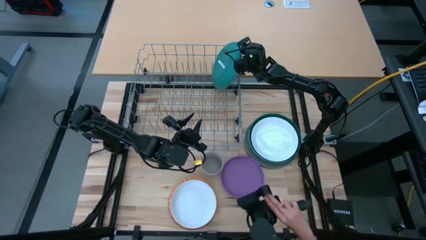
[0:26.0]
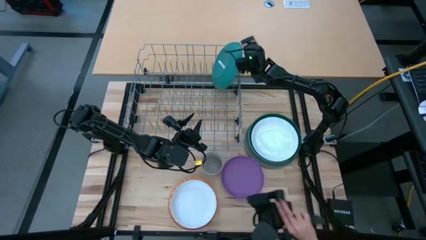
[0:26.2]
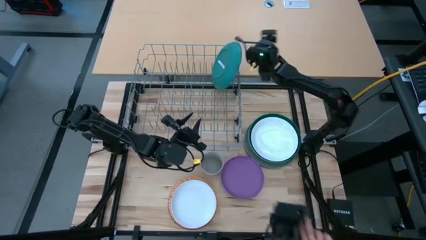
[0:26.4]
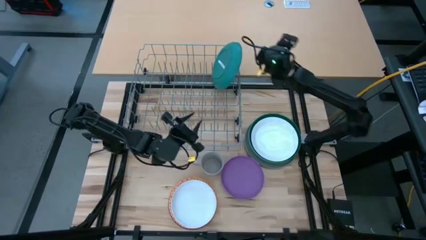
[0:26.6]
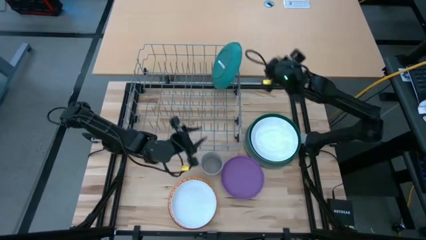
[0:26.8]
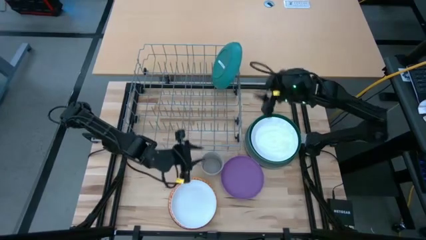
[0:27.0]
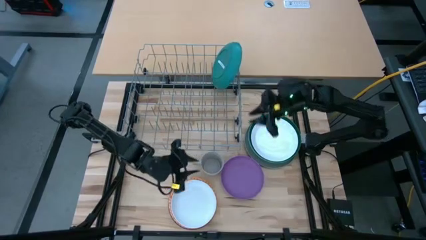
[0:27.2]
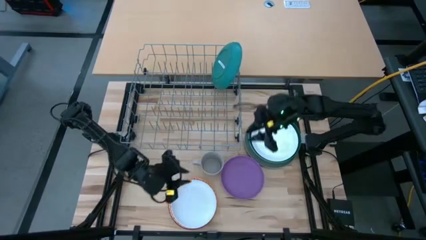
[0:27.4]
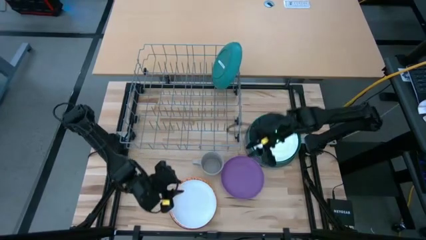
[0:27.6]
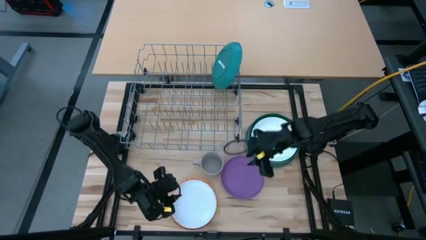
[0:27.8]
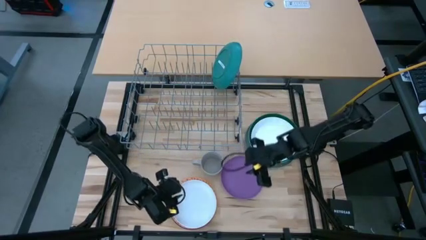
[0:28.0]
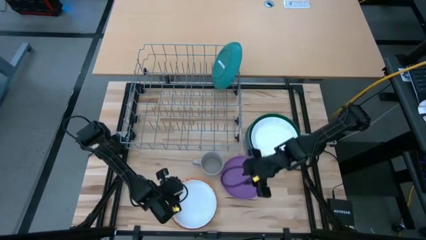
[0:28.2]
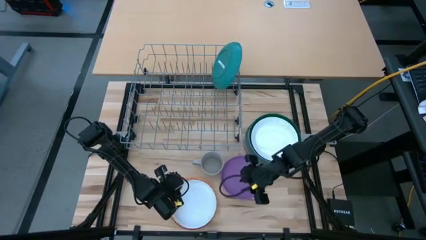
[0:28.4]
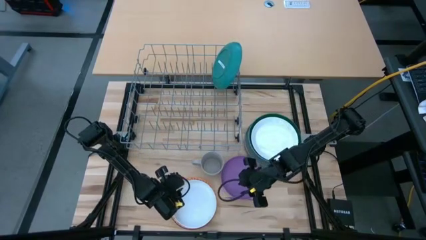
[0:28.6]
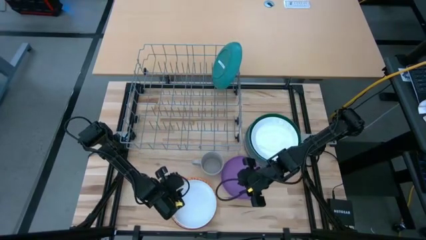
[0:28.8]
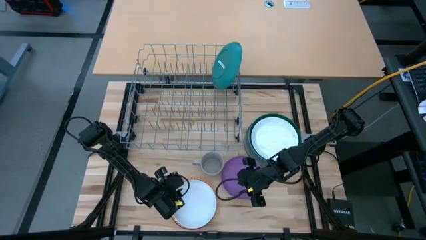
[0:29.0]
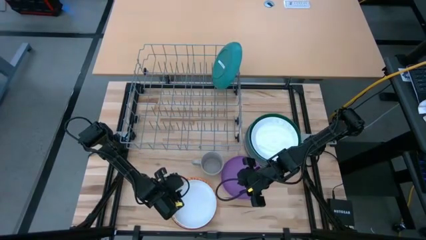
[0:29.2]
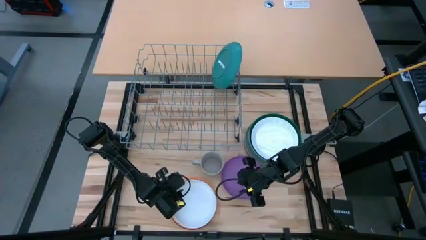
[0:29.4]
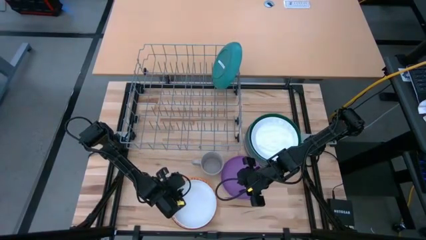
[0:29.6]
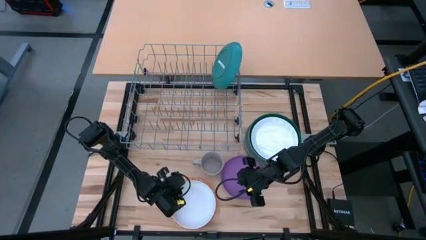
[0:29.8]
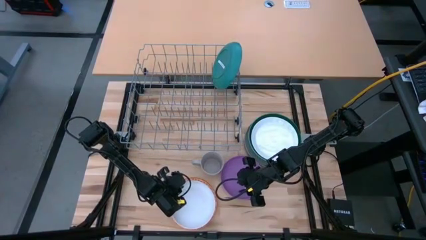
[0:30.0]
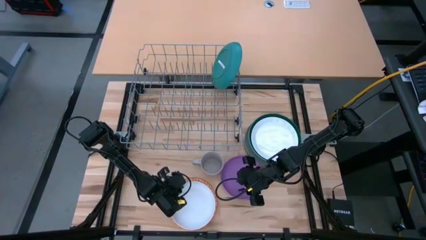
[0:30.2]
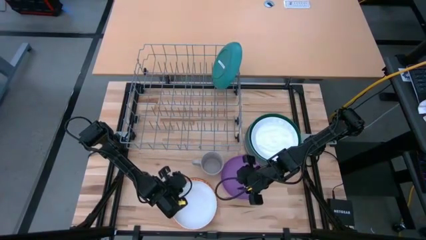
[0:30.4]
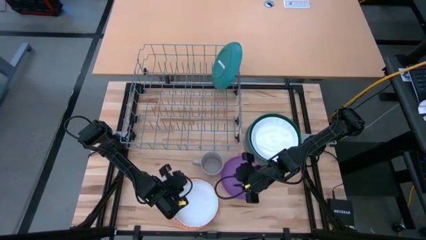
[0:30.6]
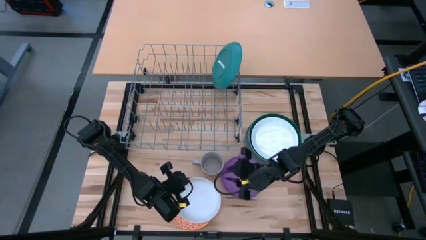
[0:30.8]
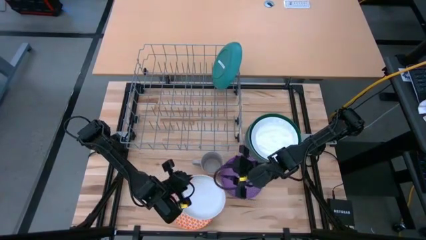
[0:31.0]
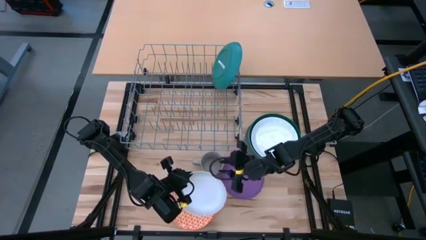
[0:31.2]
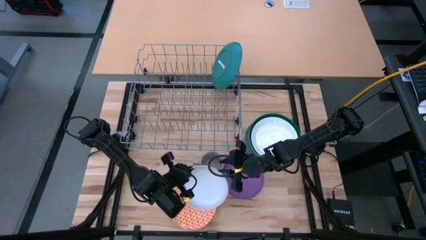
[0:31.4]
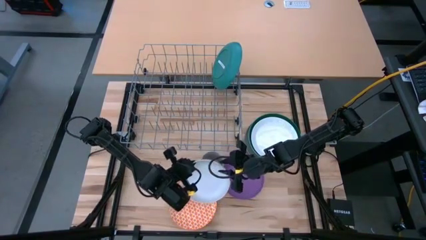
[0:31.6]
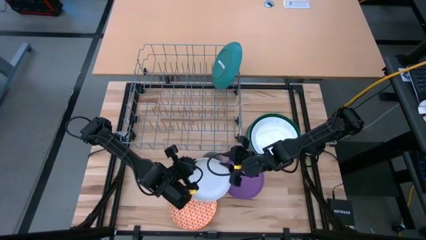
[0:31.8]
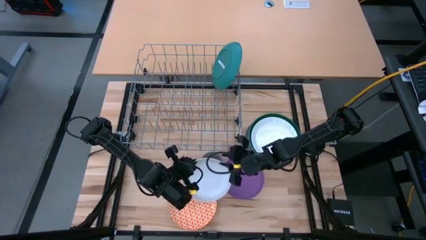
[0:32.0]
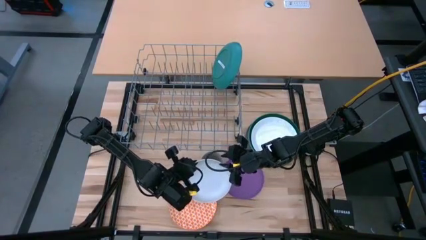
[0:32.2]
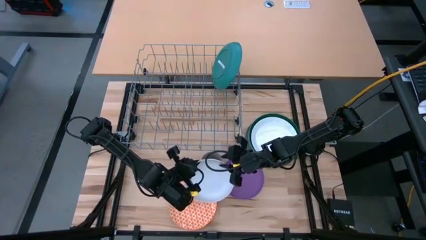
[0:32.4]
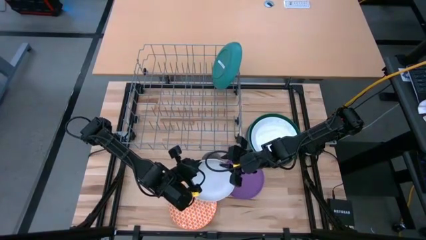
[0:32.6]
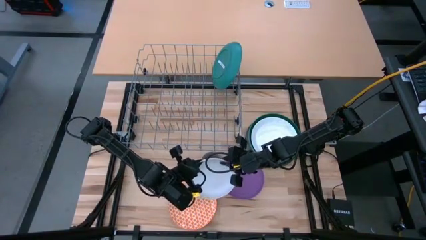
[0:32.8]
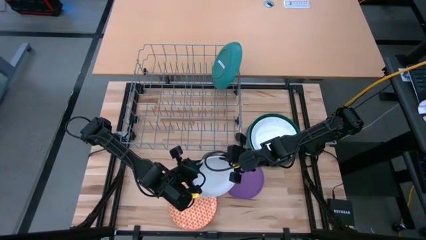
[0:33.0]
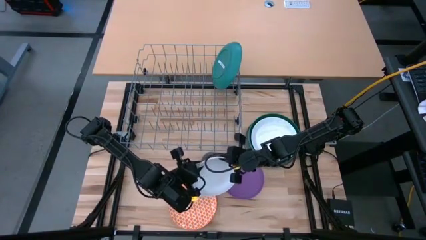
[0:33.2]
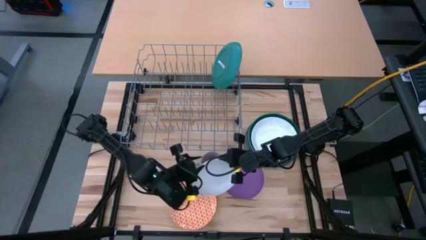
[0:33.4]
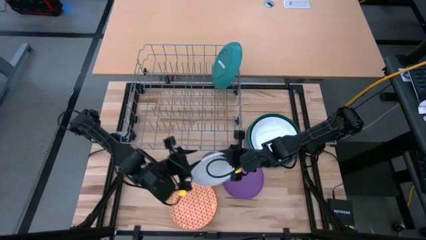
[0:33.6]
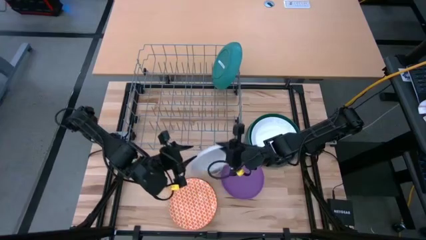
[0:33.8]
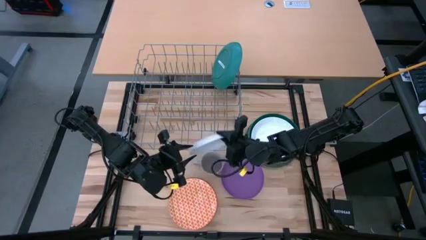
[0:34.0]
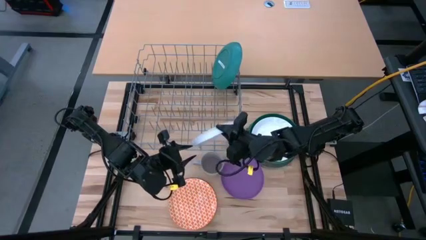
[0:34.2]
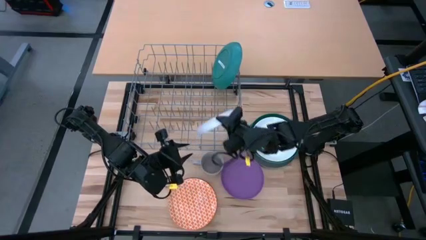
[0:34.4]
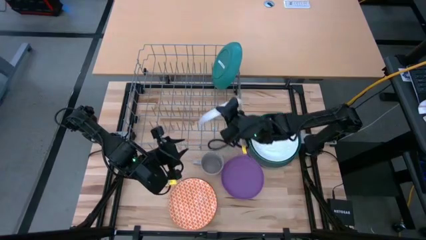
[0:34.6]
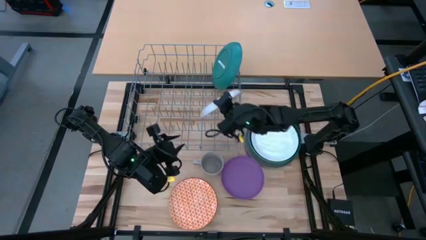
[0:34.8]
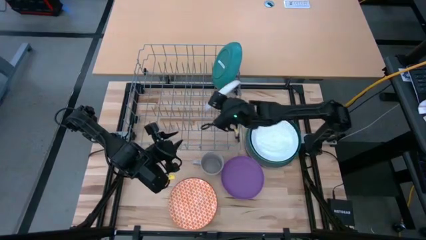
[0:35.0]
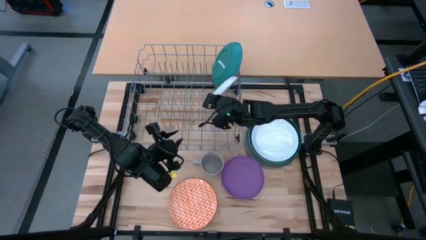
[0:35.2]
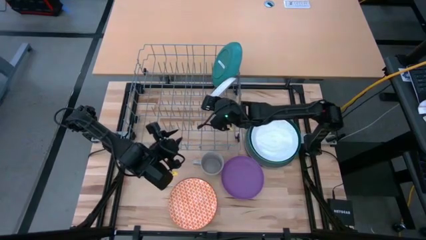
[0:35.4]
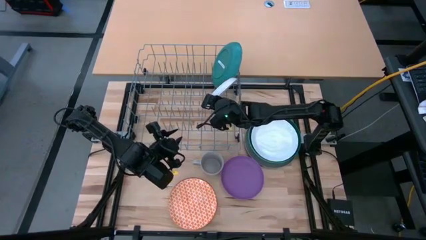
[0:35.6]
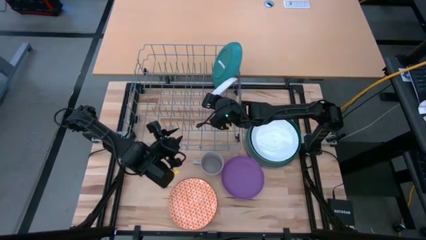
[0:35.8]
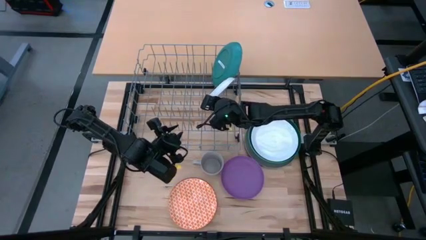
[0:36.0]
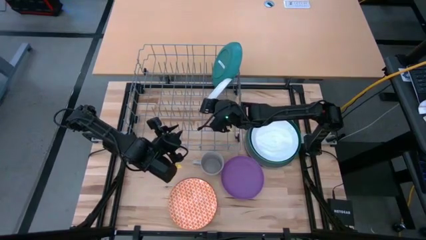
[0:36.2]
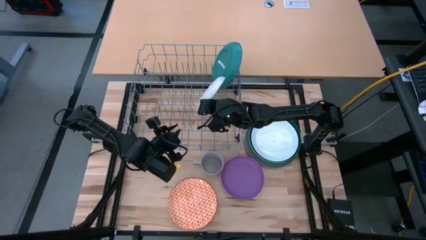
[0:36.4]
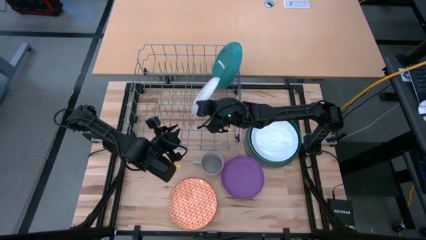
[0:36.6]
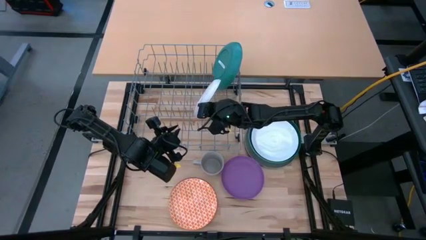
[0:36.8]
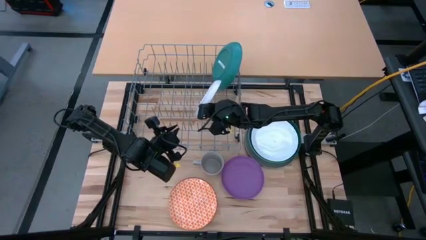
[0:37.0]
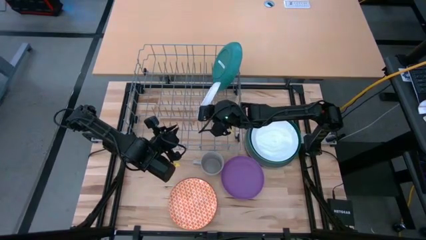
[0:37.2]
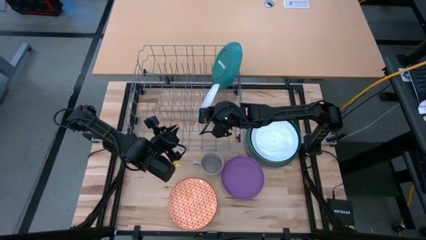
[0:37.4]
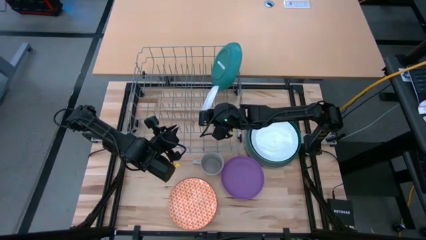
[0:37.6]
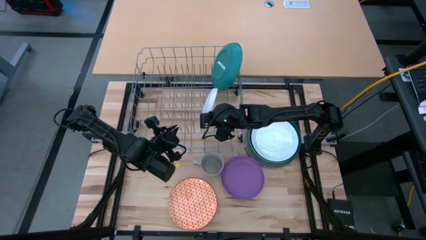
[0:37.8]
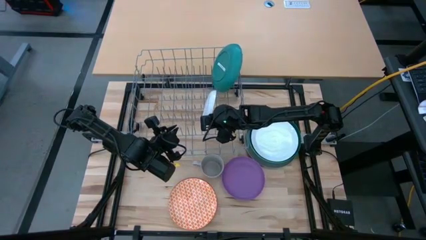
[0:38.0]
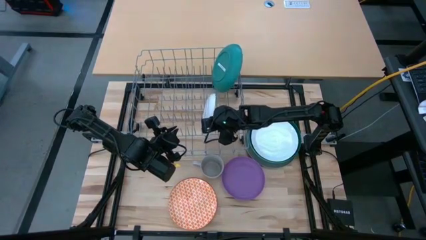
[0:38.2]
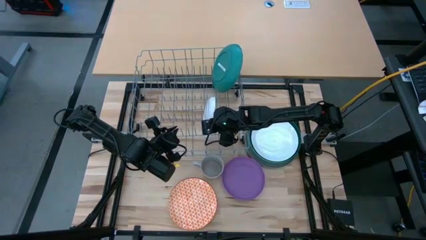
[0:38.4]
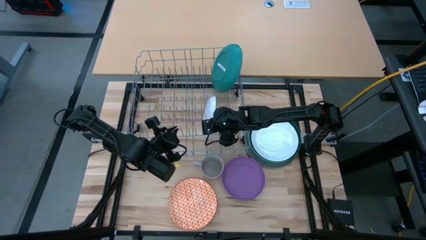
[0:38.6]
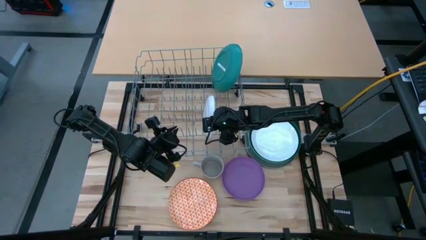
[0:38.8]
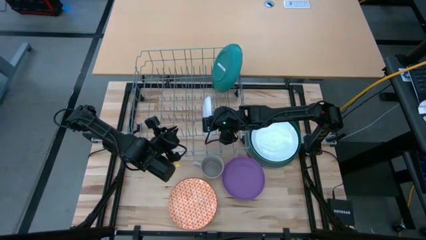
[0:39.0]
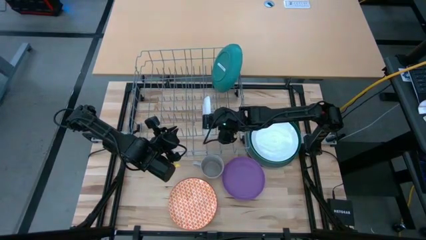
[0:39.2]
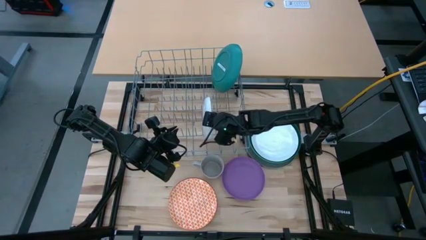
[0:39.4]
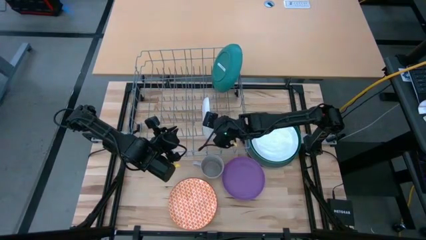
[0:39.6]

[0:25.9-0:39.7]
Task: Sort dishes
Put the white plate in the dish rack
